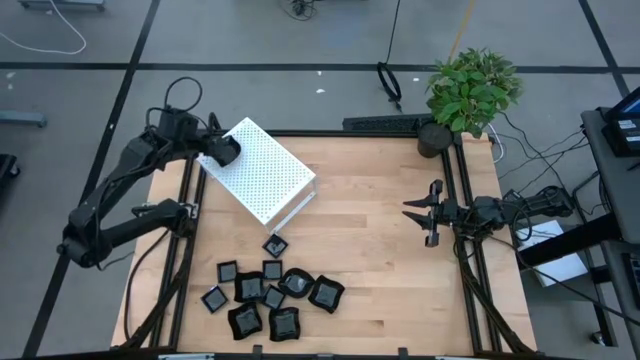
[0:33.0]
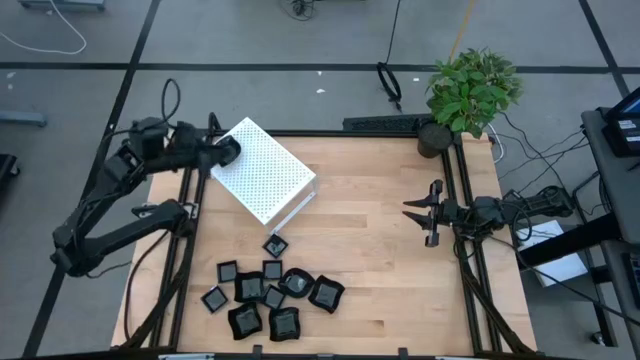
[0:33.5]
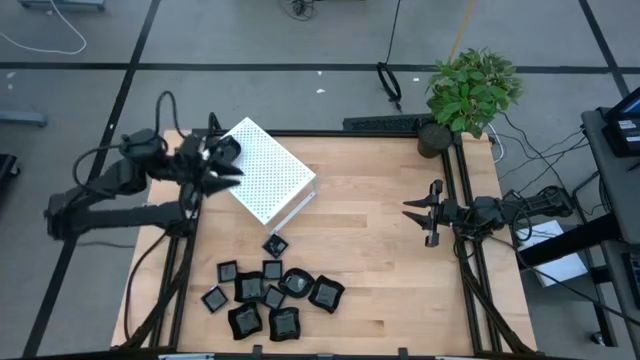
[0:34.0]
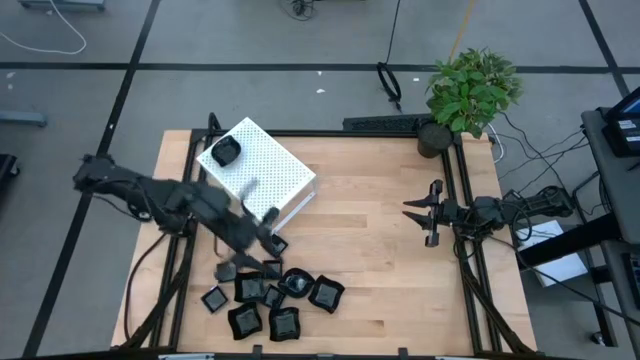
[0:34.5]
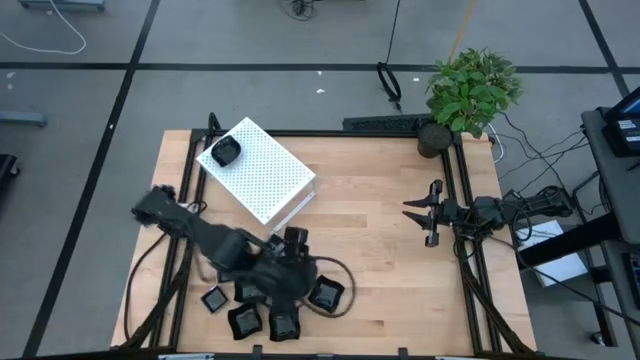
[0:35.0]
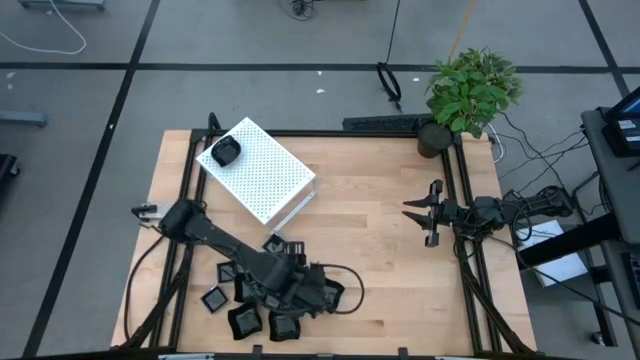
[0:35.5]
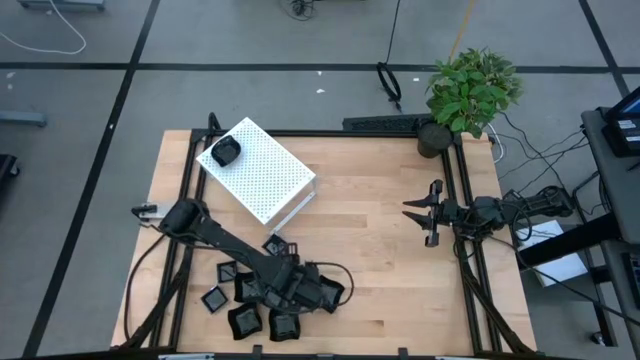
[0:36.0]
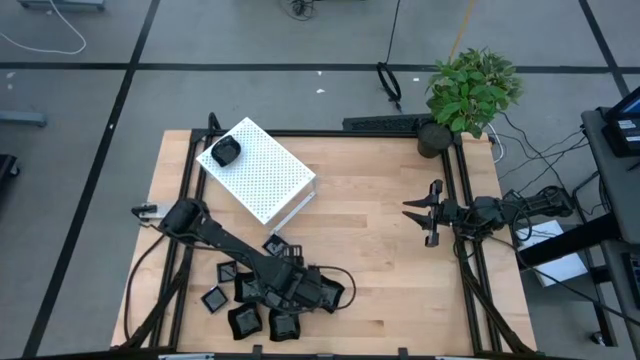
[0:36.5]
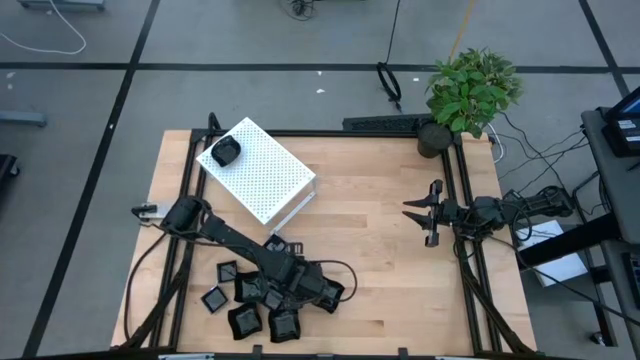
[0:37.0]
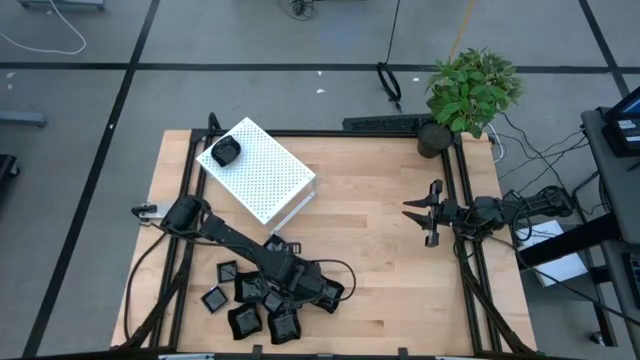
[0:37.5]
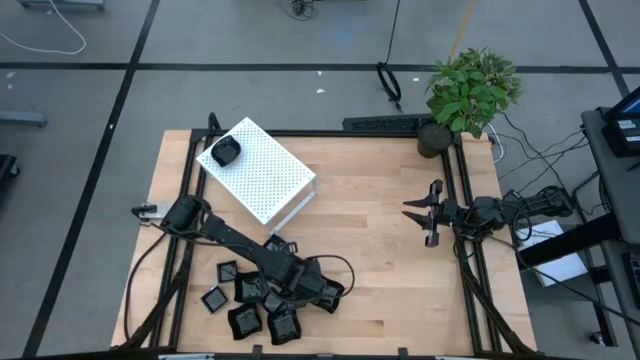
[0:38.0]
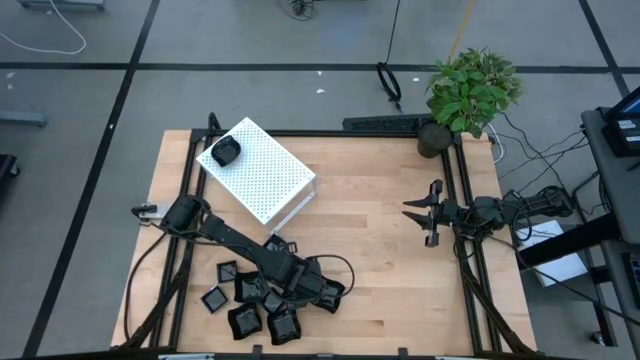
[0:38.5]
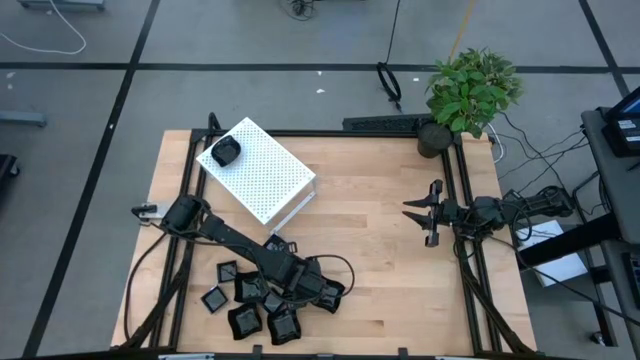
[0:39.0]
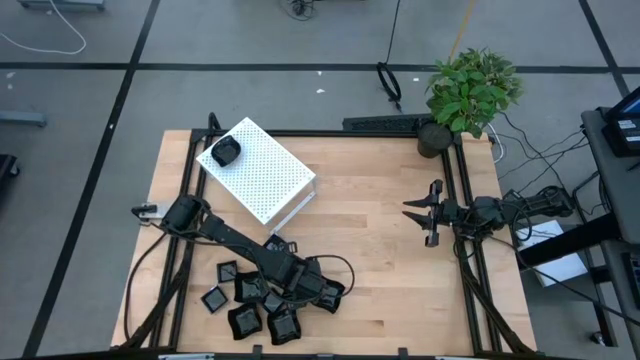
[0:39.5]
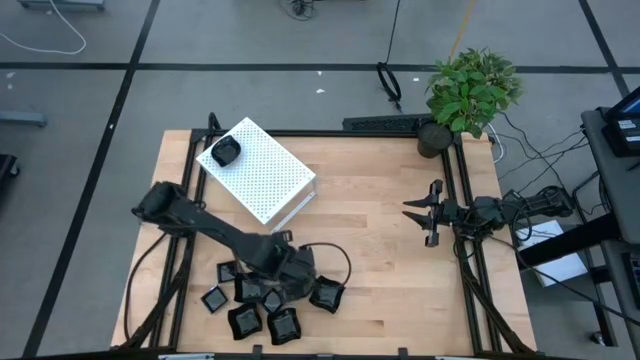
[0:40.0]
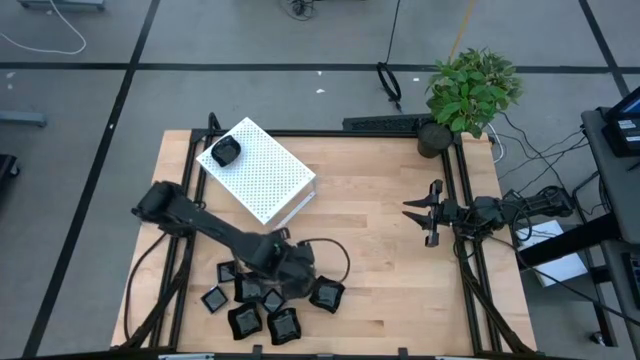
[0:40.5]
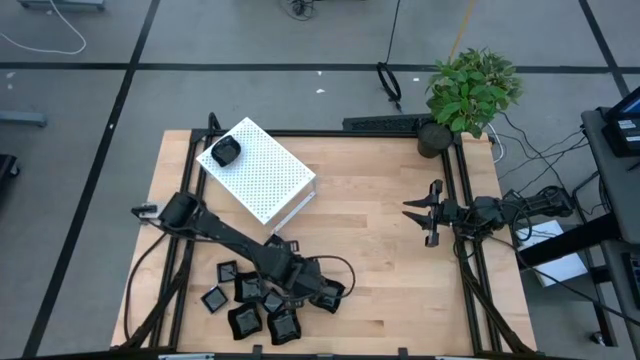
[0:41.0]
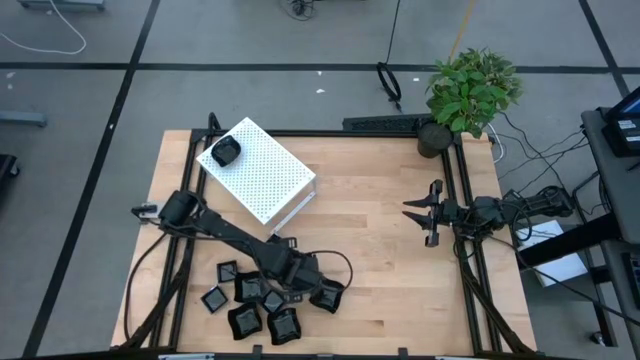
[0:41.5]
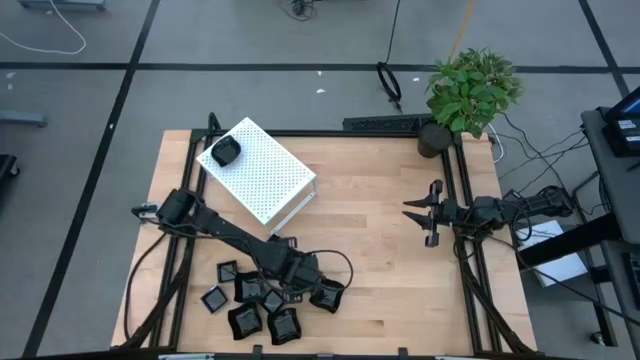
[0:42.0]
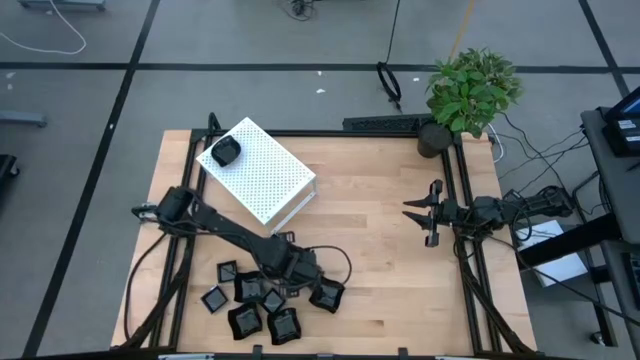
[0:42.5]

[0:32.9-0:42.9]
Task: Pick & Place Mini shaped plates
Stack the black leaf-shaped plate on top of the black leaf-shaped plate on the shelf

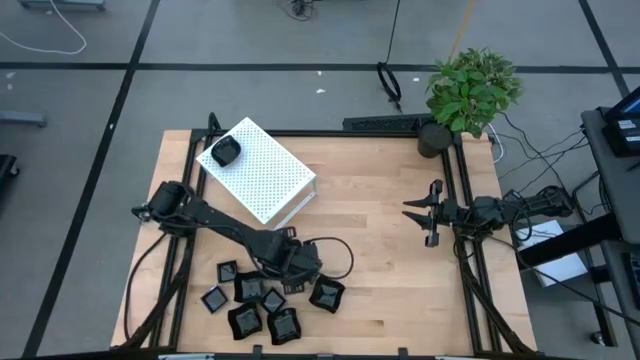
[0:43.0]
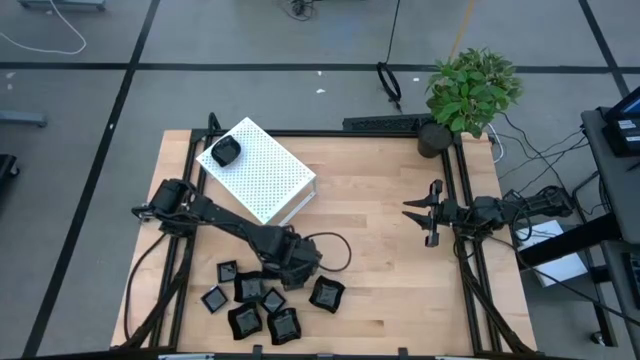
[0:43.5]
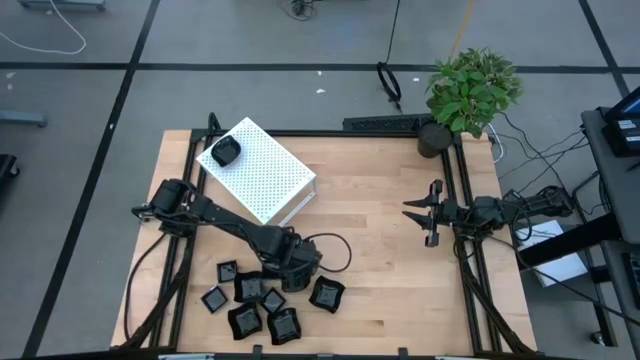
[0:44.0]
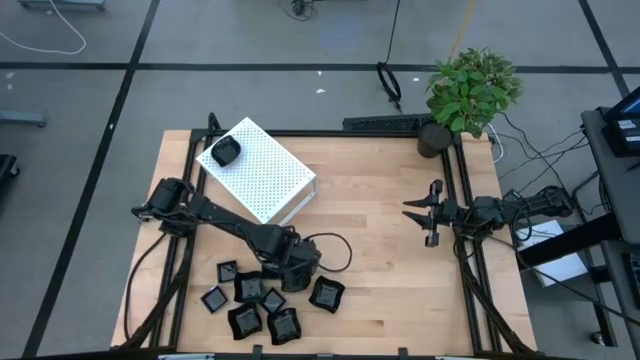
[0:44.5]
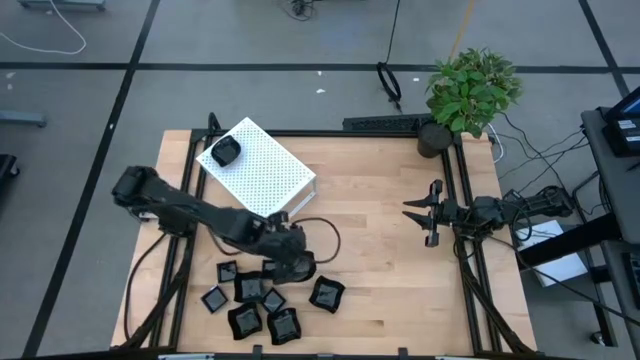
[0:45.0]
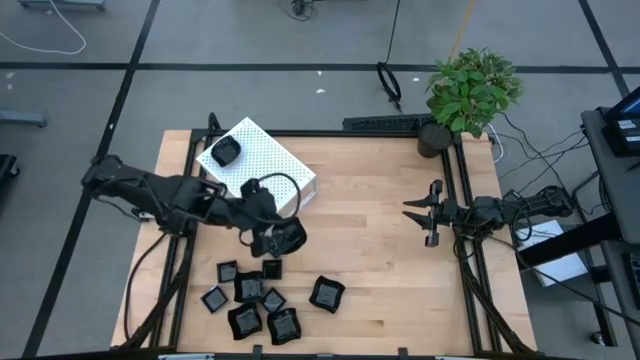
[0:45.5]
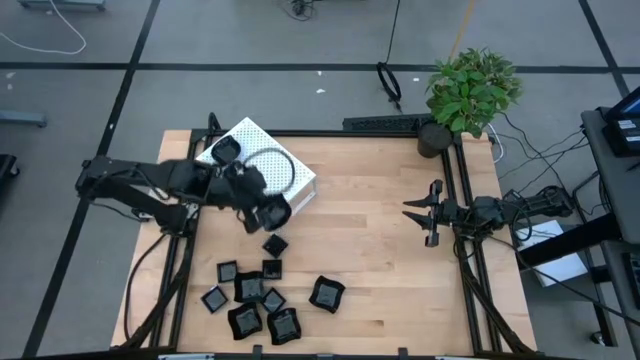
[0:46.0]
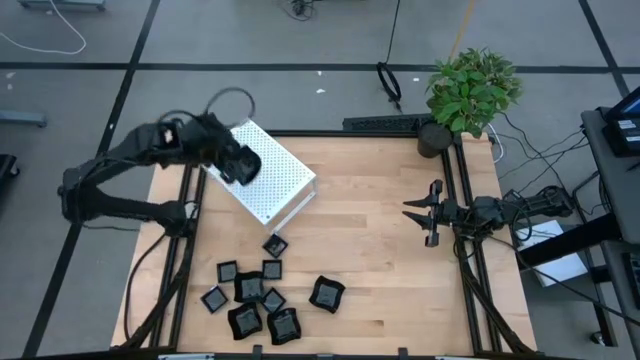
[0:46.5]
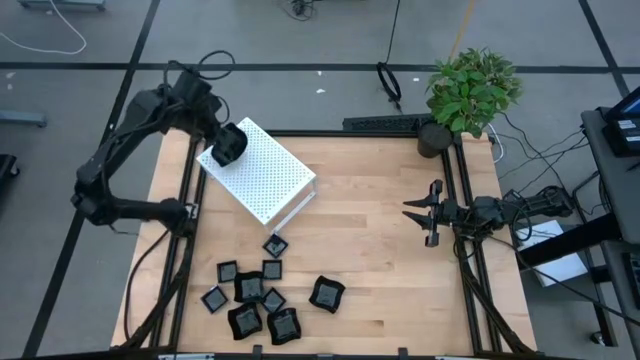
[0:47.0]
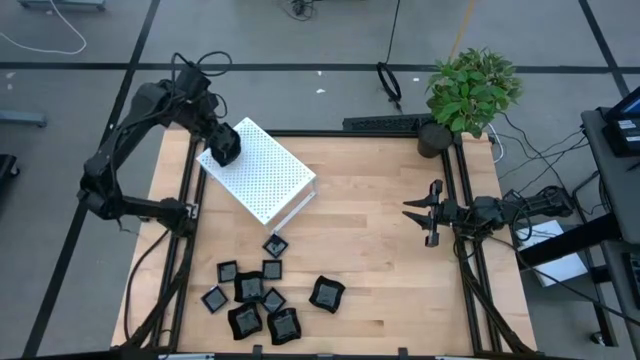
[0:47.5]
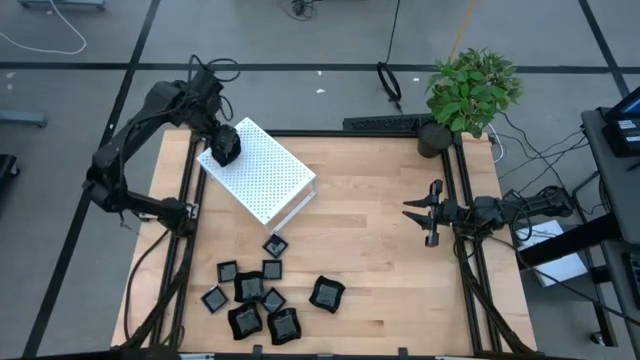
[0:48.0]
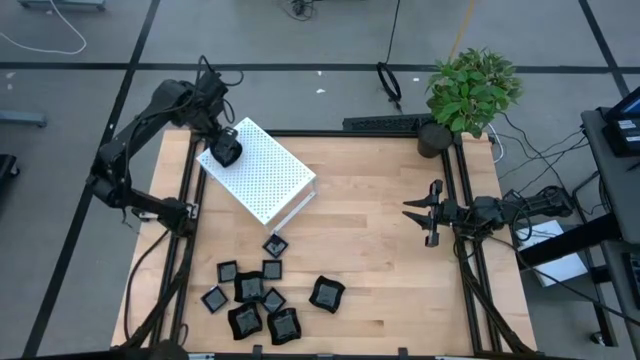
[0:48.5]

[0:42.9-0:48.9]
Stack the black leaf-shaped plate on top of the black leaf-shaped plate on the shelf

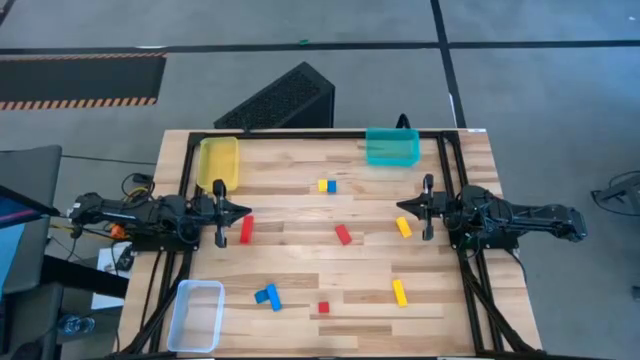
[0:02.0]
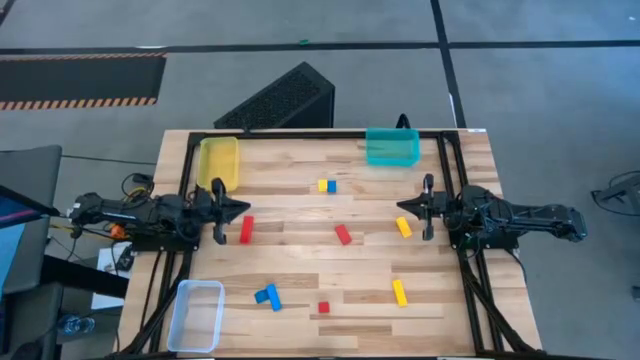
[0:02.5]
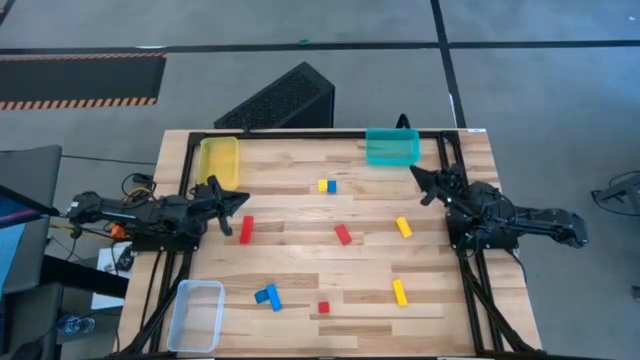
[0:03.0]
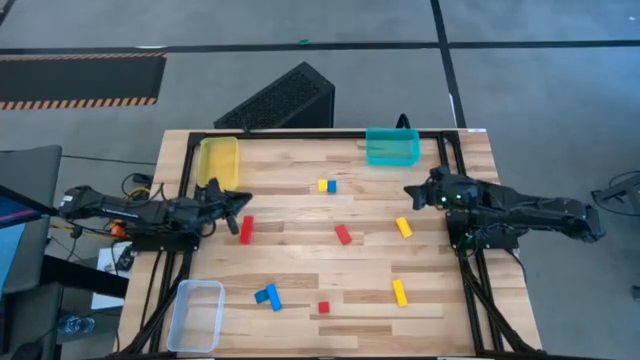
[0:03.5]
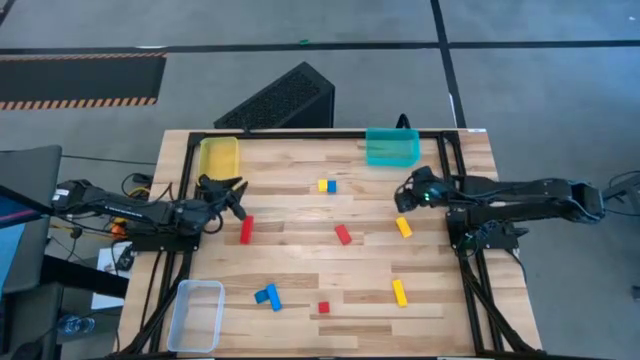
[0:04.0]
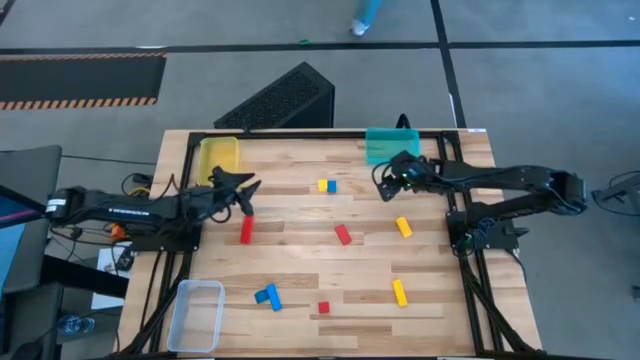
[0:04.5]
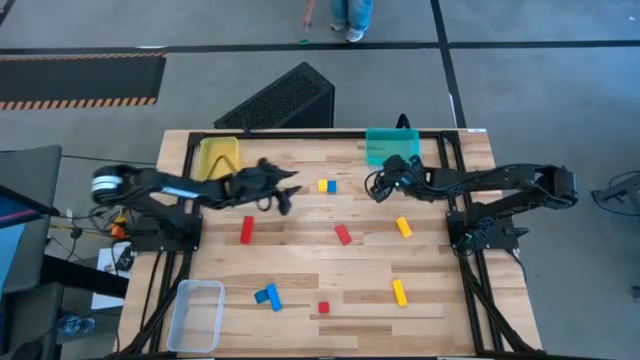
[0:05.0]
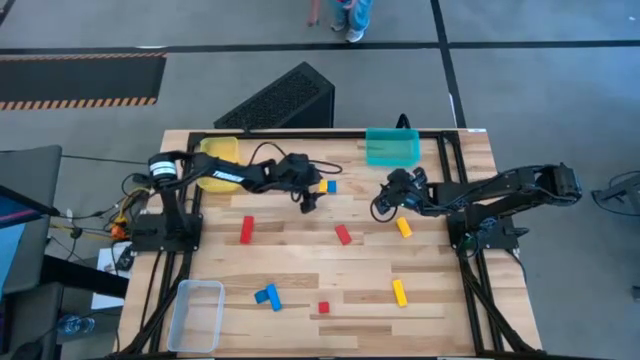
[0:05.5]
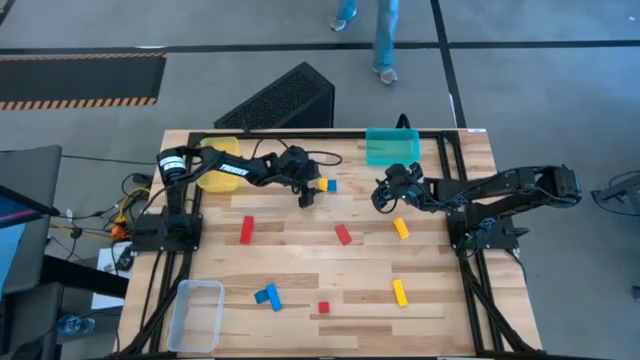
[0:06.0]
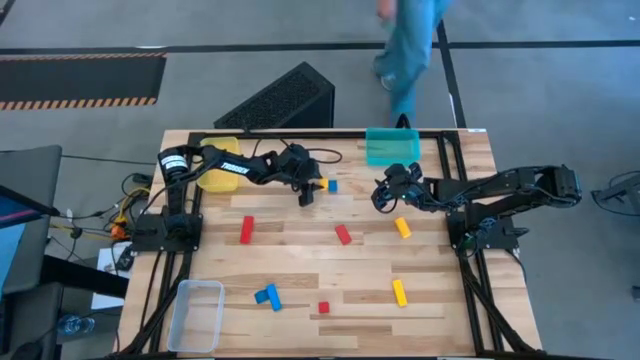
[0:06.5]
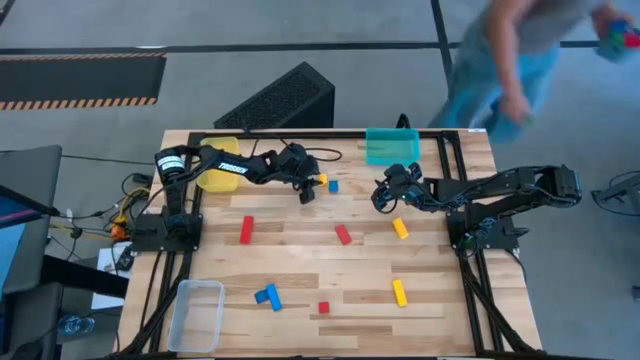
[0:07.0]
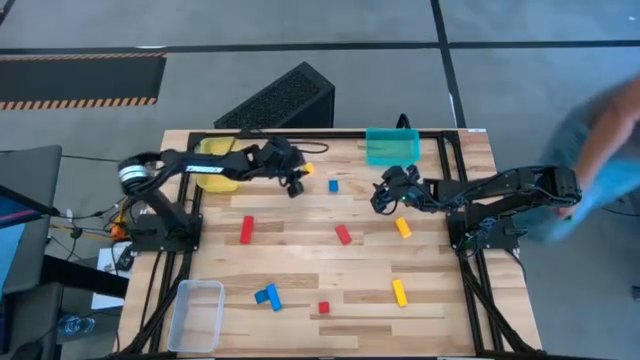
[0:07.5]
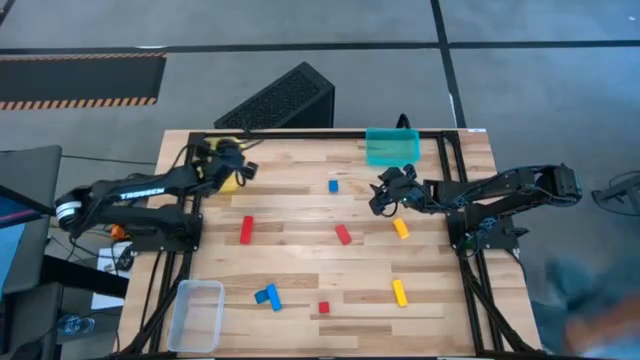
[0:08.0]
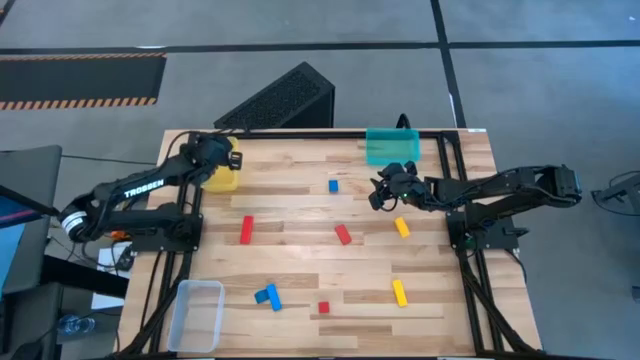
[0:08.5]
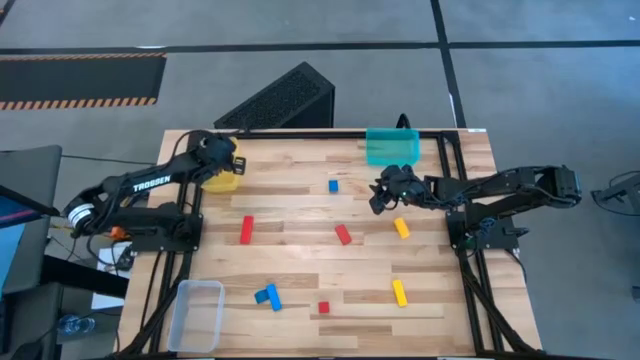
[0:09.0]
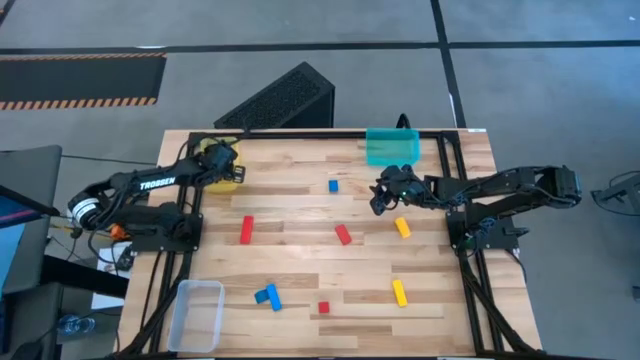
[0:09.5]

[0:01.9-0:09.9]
Task: Sort & place blocks by color
Put the top left yellow block into the yellow bin
